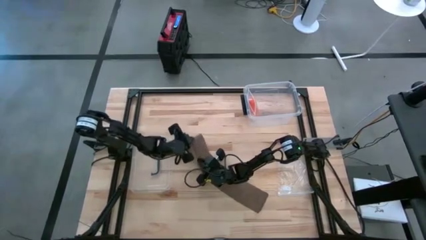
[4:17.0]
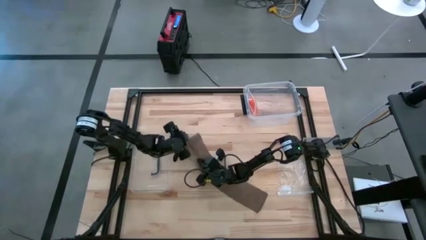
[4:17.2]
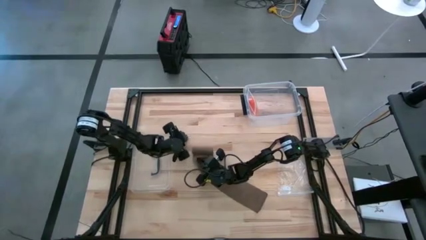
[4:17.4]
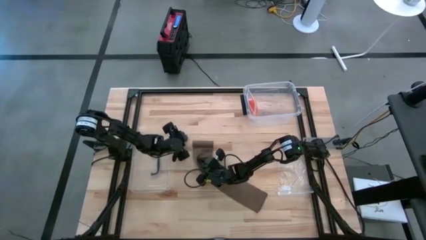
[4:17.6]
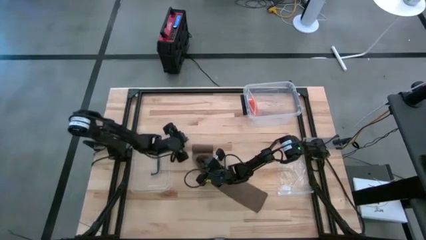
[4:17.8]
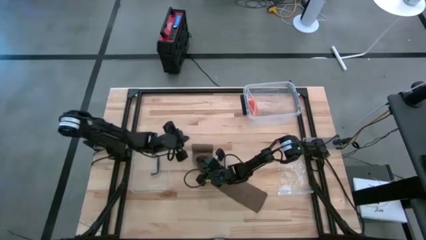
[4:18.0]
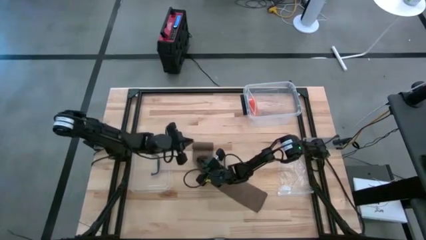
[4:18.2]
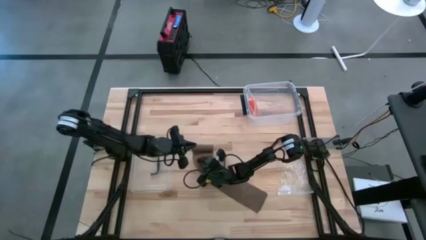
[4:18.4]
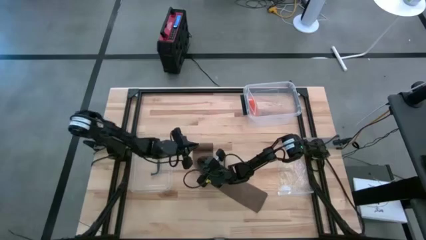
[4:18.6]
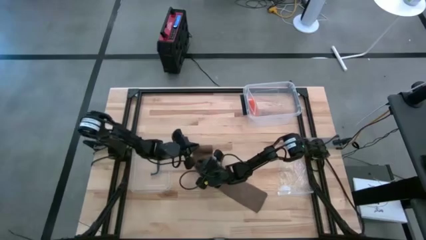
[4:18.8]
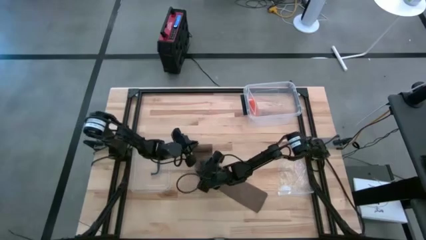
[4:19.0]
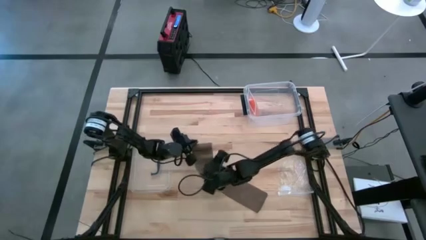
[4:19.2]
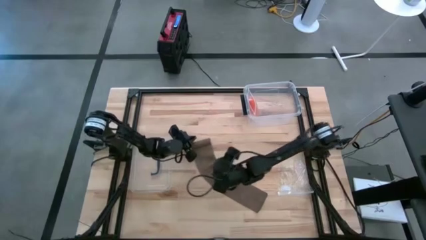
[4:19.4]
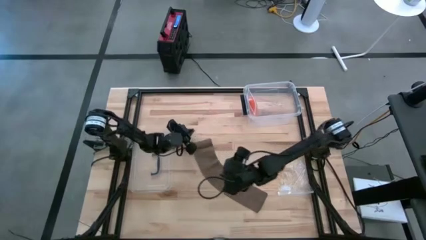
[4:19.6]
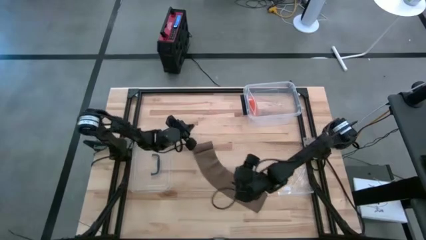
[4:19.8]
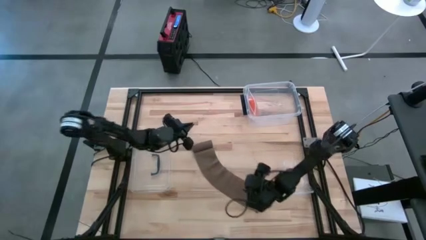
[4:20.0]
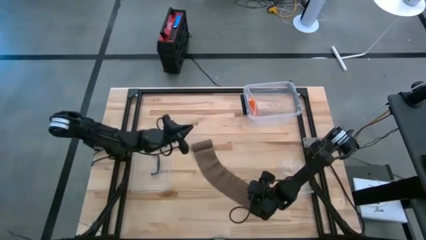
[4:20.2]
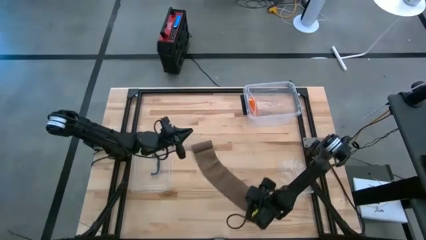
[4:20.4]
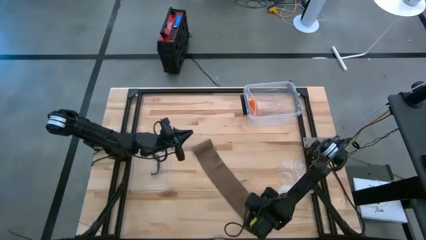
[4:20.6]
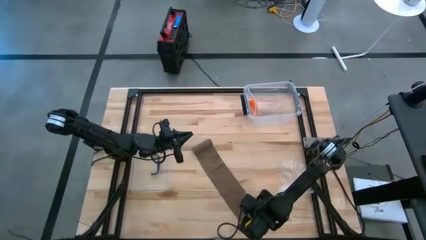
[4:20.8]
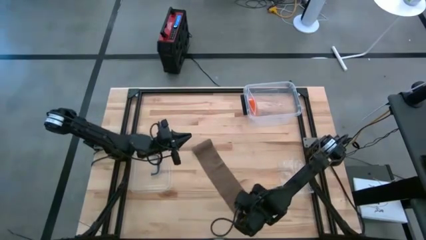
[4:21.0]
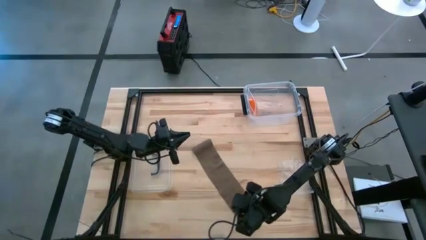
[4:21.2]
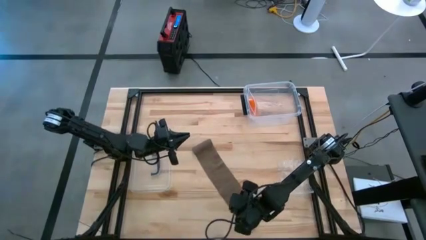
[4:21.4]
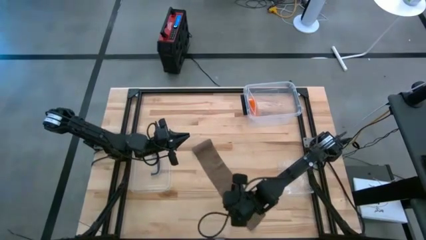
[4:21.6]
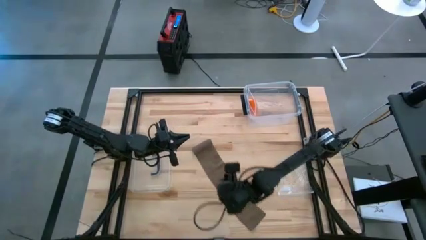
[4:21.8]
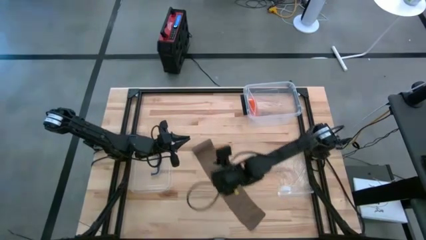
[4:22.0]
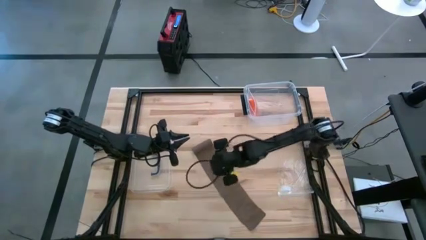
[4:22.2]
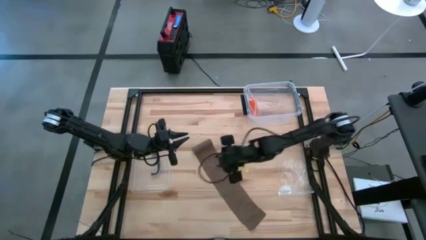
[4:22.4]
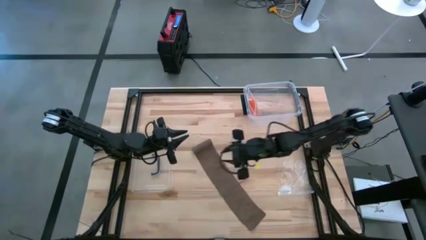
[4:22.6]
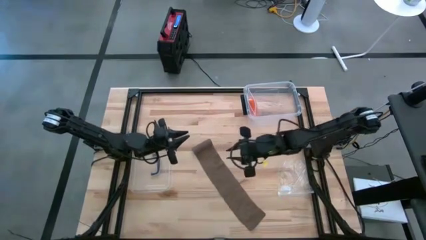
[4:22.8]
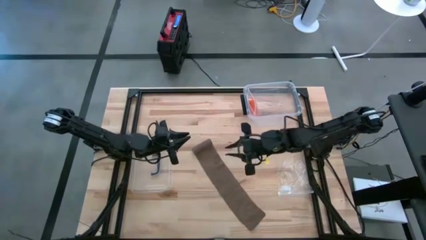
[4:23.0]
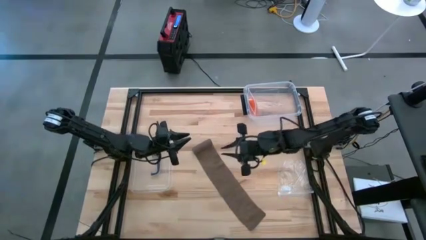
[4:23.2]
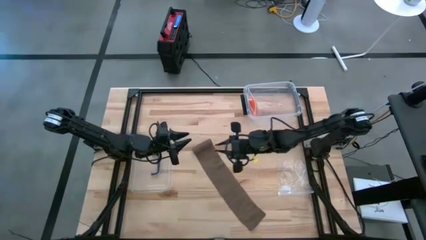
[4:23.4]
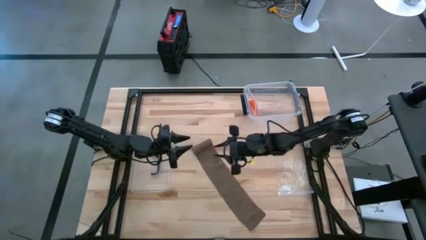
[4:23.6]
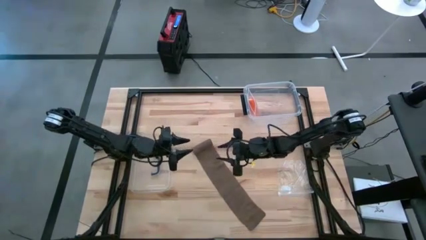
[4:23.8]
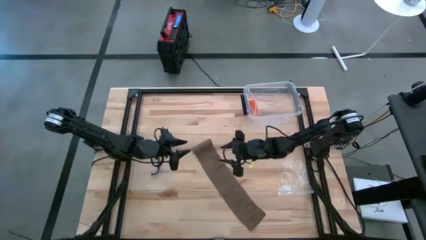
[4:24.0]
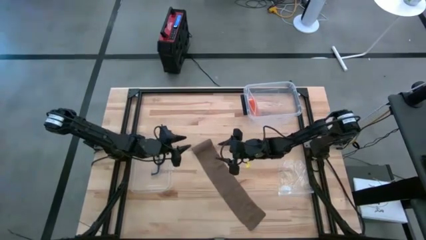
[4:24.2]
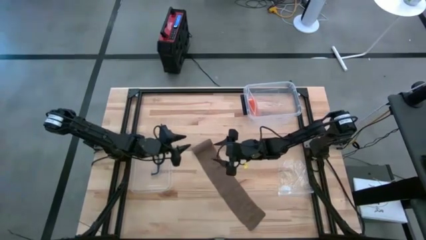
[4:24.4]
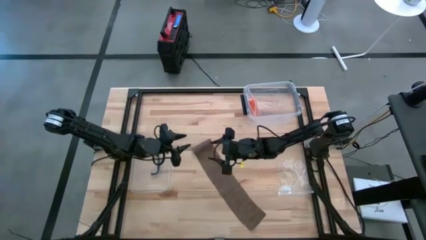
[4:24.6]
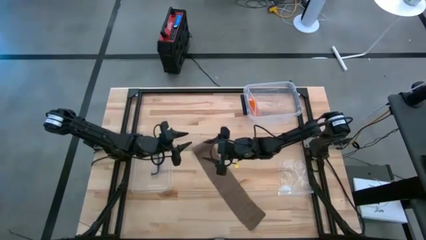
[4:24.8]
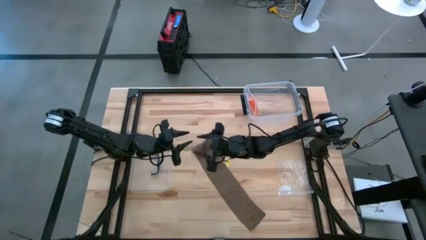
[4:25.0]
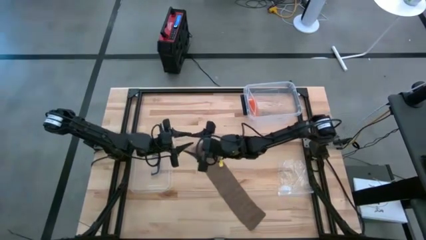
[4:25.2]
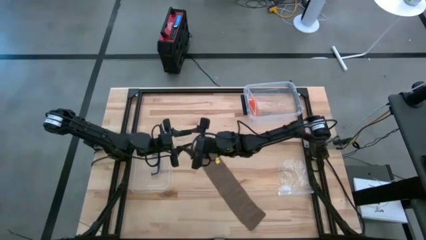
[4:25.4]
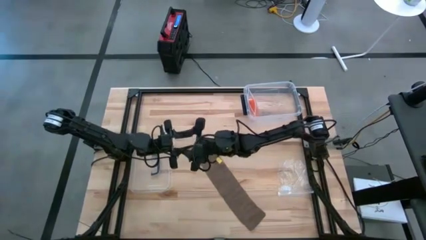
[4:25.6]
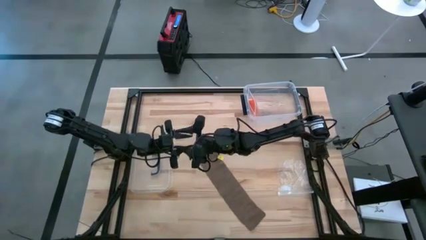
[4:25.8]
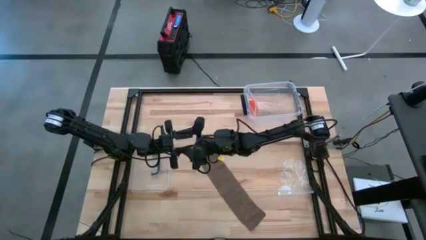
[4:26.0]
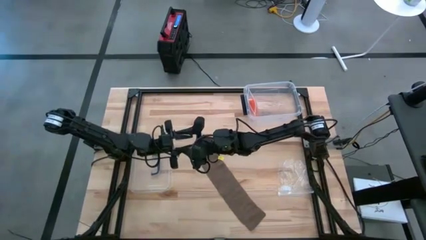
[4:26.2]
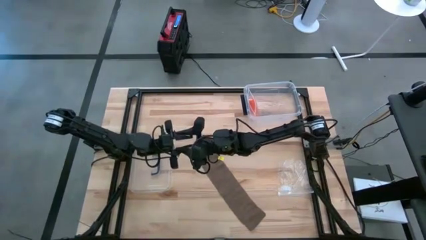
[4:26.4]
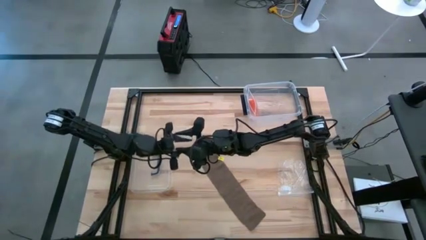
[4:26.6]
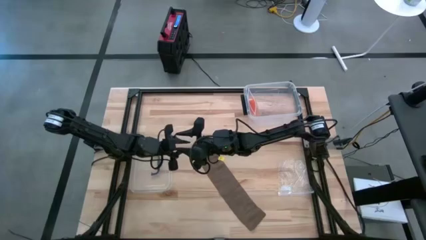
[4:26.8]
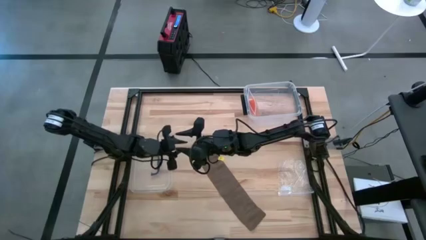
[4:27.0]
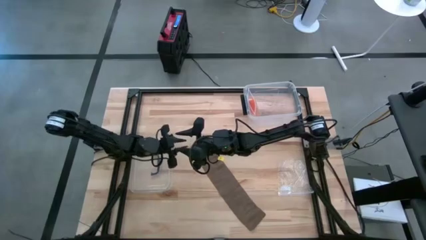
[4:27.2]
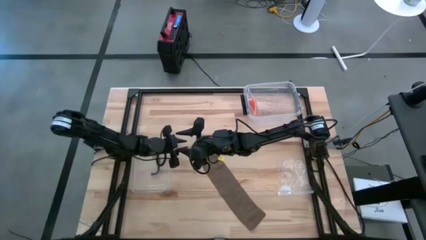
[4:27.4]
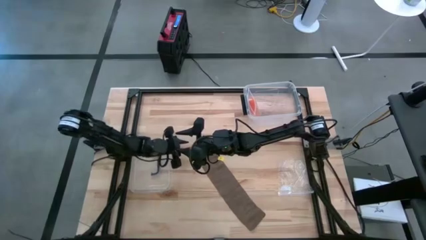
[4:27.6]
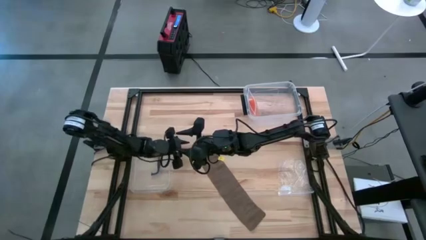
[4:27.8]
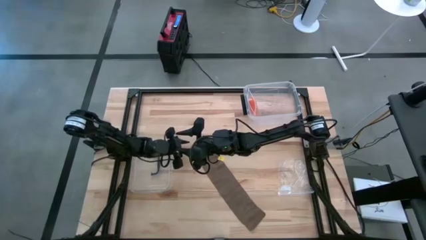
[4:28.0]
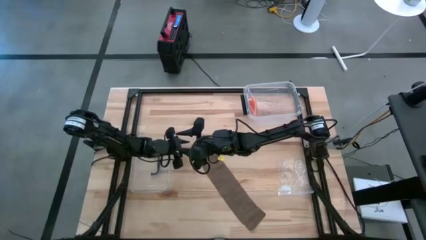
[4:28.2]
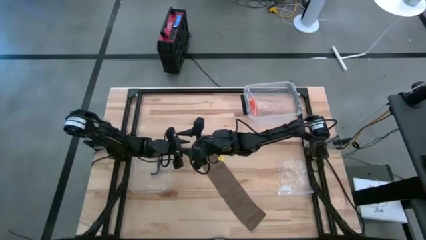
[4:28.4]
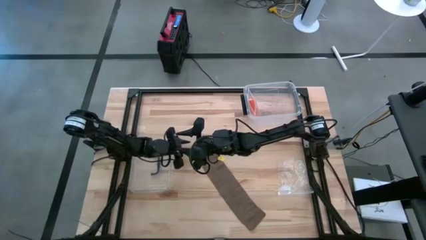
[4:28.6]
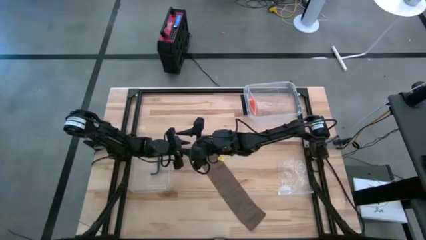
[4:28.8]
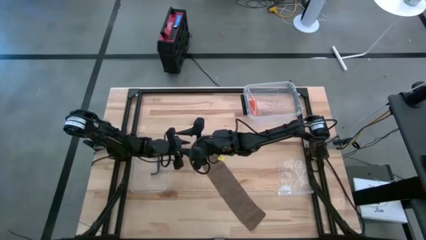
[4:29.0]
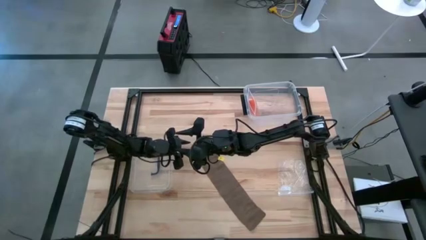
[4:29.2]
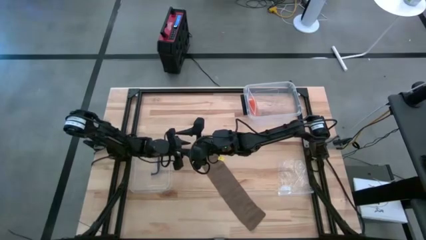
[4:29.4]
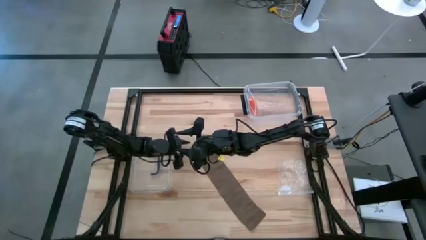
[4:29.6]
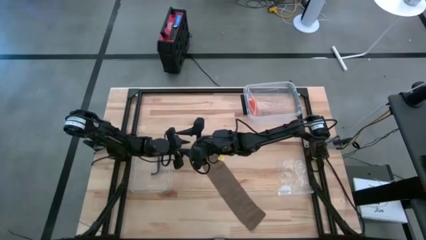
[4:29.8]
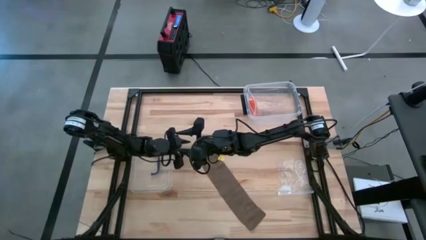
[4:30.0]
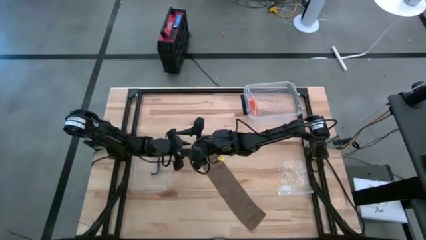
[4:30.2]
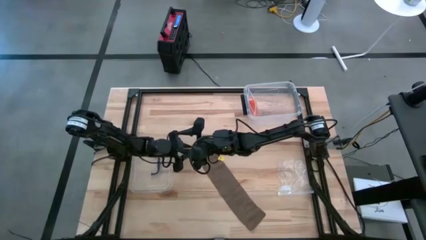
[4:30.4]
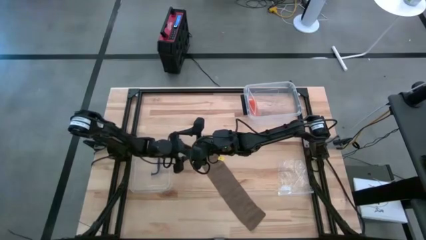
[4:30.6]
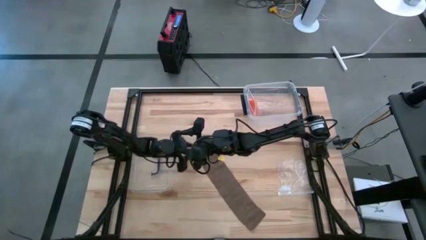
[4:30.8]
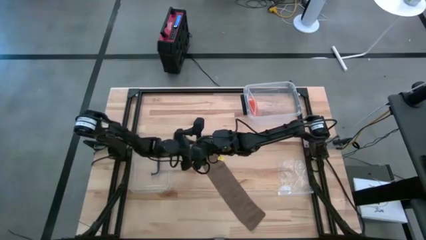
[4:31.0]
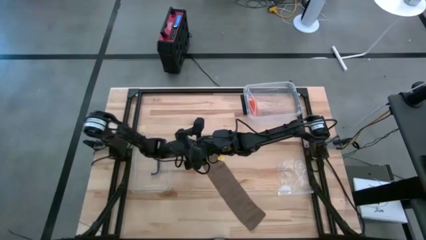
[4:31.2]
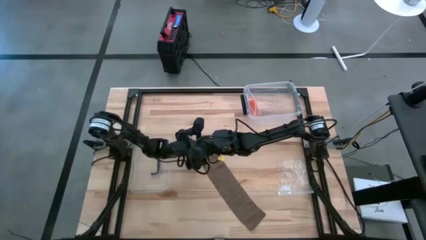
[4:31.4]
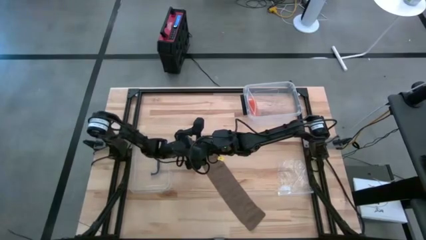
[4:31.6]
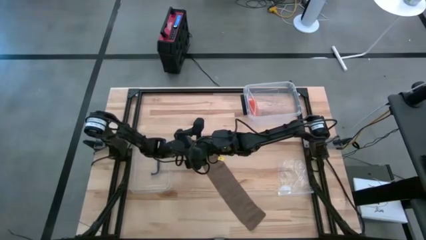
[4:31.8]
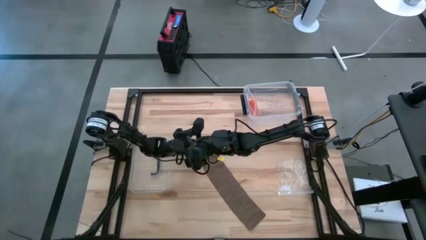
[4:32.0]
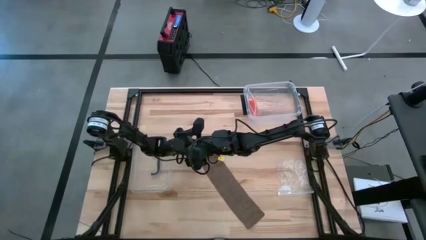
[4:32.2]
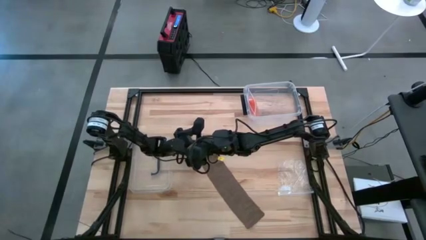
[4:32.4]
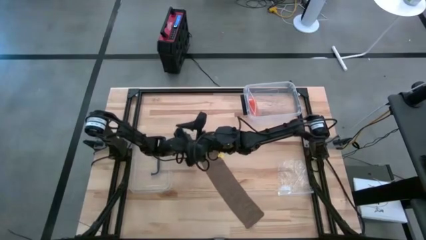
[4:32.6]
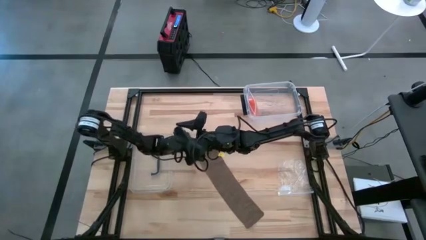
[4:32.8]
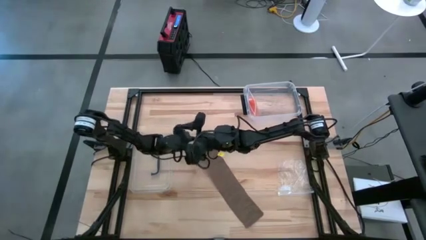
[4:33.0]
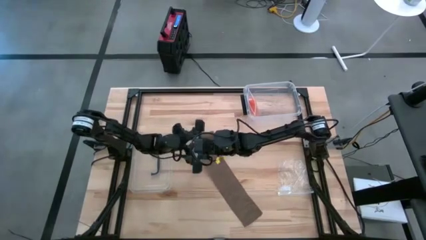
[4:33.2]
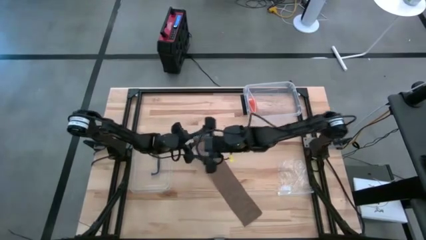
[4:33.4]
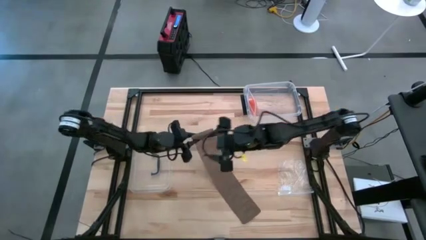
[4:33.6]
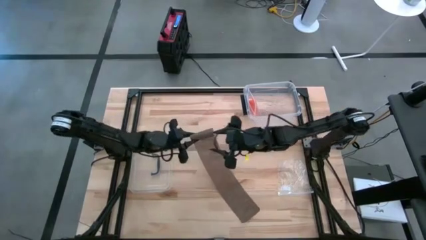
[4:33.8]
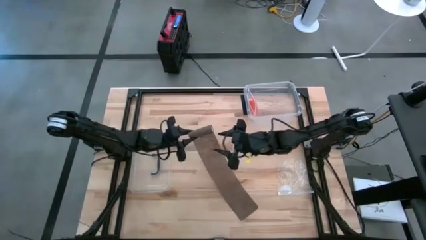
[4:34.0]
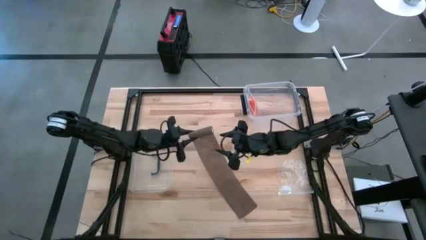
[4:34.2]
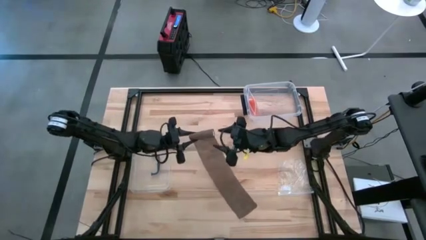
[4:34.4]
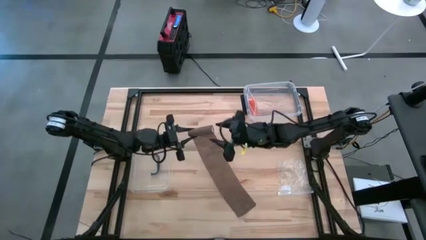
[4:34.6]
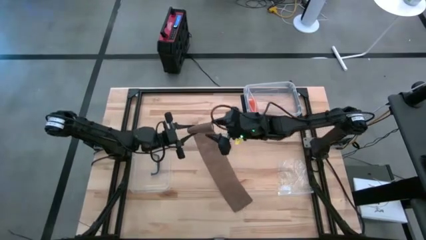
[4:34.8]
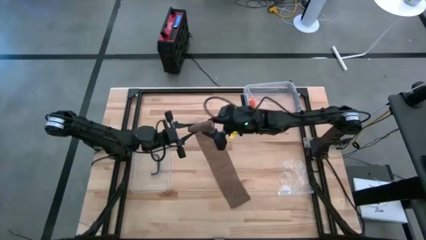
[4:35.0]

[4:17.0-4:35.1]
Task: Roll bandage
Roll the brown bandage
